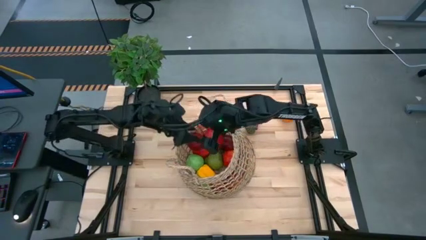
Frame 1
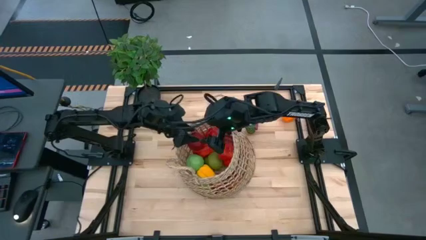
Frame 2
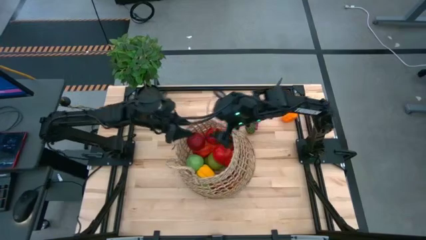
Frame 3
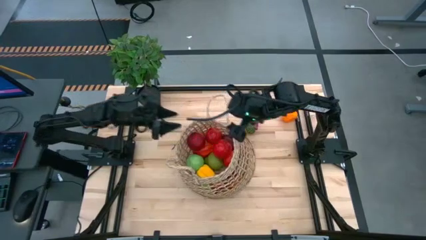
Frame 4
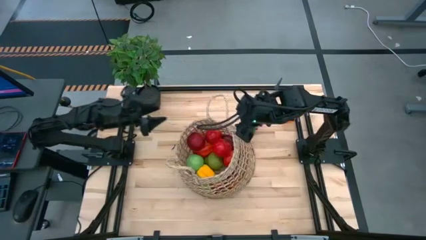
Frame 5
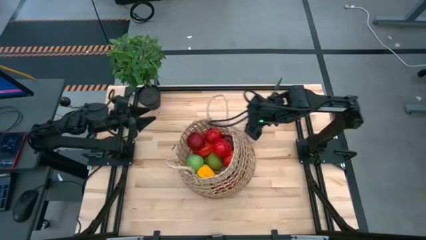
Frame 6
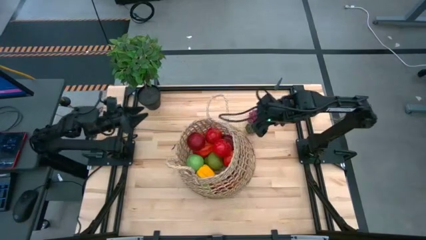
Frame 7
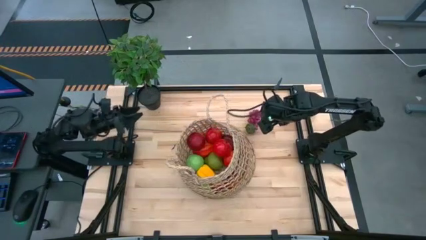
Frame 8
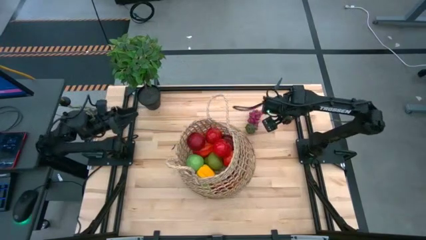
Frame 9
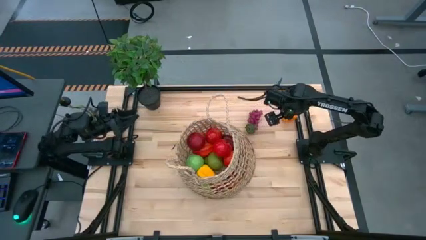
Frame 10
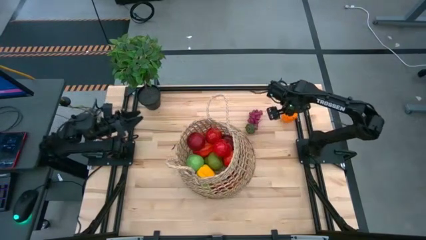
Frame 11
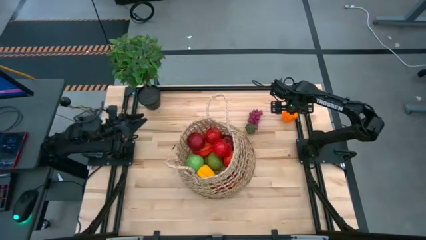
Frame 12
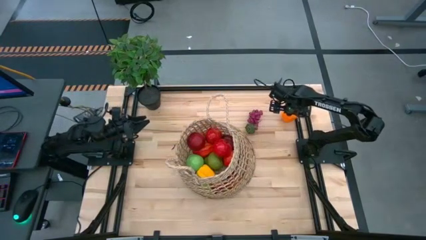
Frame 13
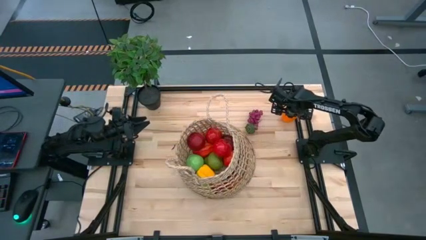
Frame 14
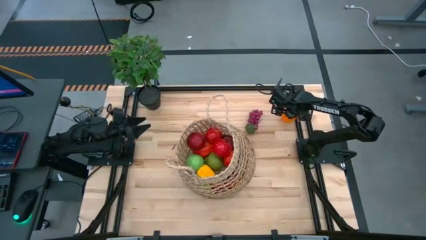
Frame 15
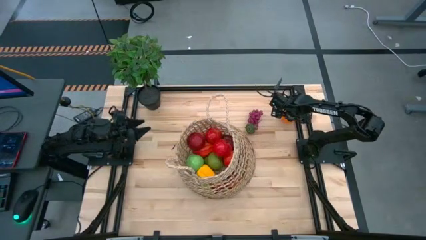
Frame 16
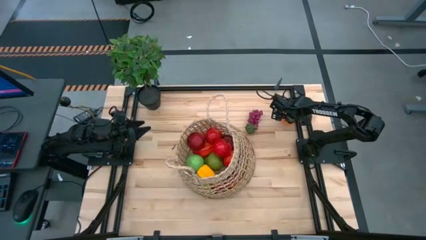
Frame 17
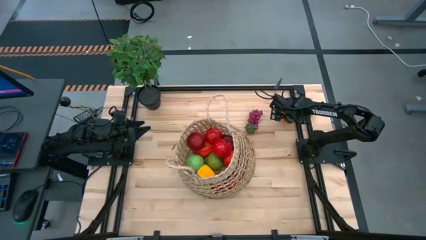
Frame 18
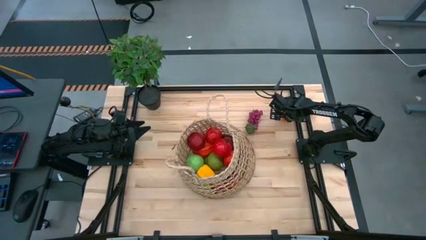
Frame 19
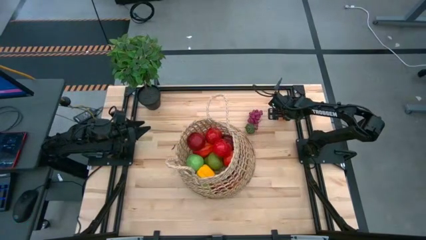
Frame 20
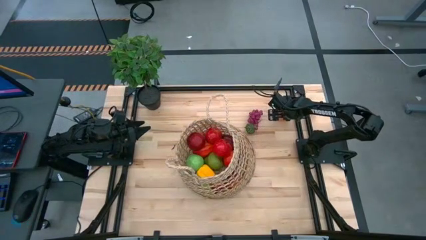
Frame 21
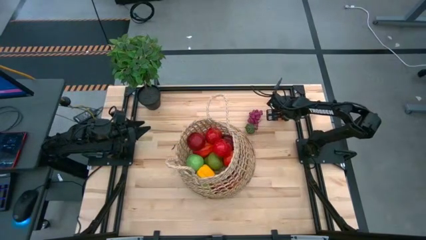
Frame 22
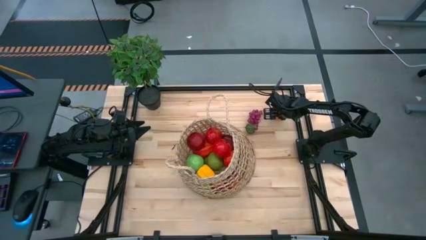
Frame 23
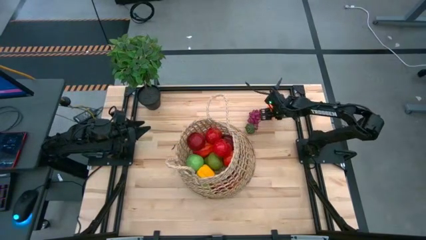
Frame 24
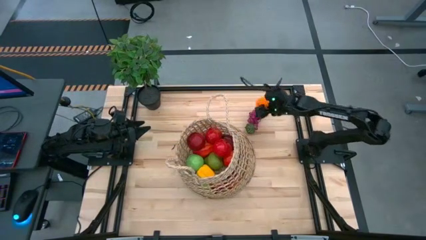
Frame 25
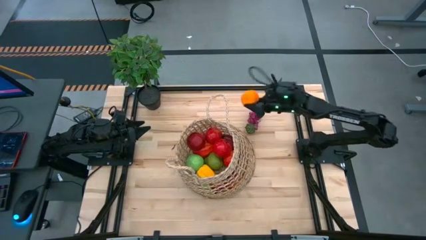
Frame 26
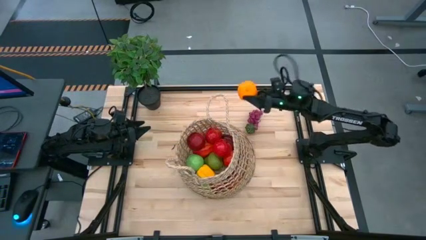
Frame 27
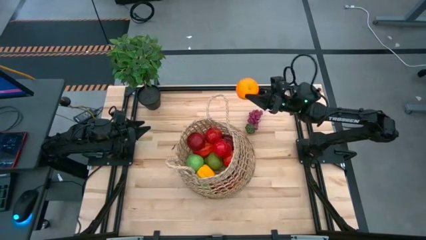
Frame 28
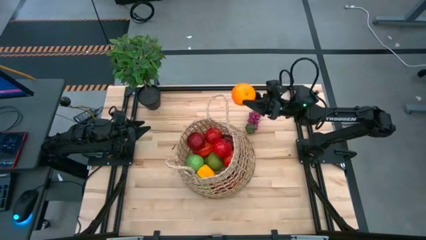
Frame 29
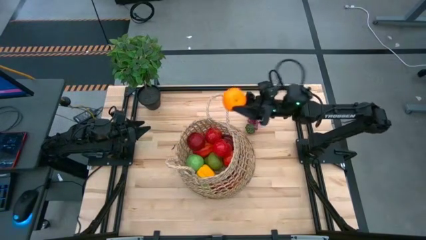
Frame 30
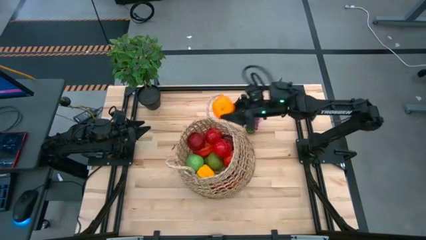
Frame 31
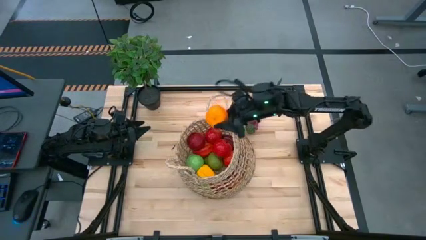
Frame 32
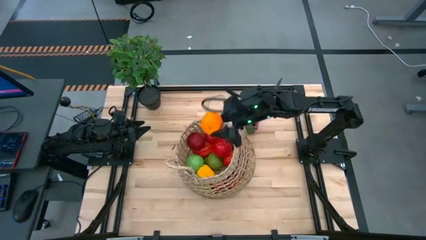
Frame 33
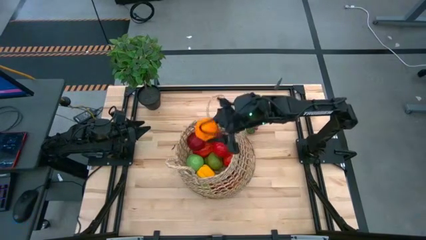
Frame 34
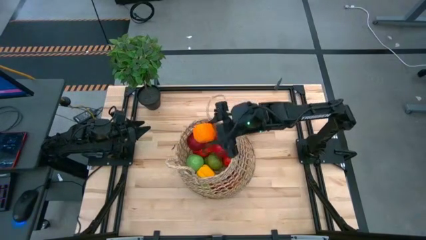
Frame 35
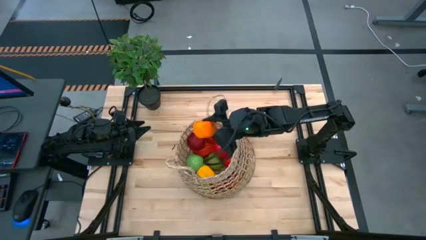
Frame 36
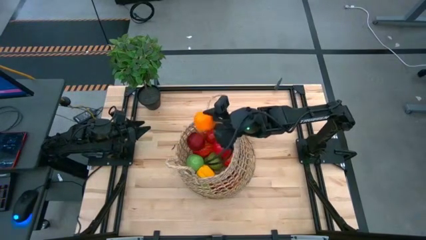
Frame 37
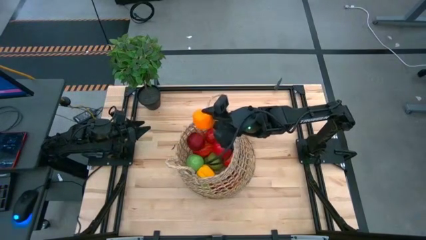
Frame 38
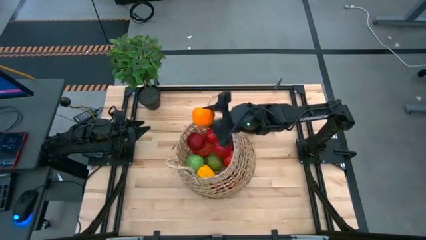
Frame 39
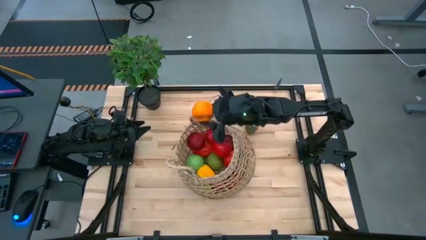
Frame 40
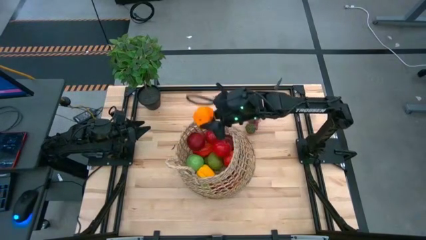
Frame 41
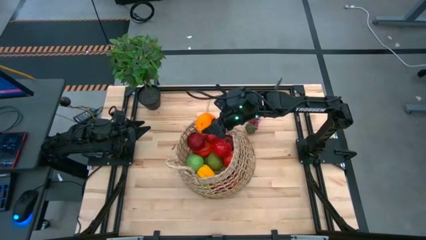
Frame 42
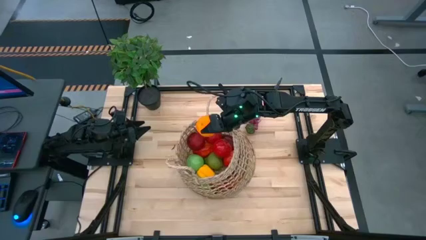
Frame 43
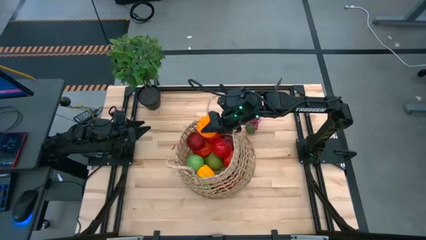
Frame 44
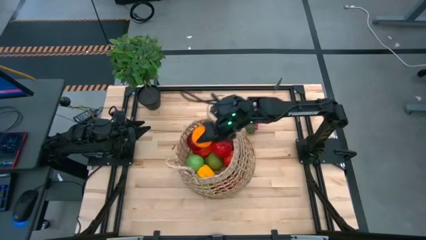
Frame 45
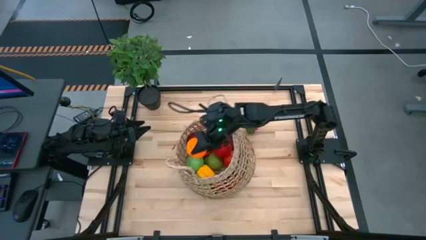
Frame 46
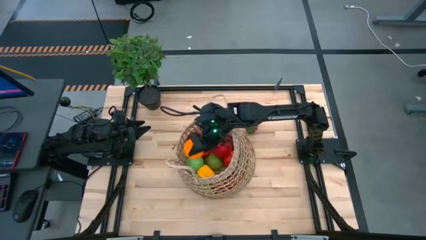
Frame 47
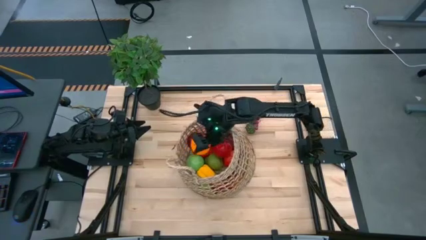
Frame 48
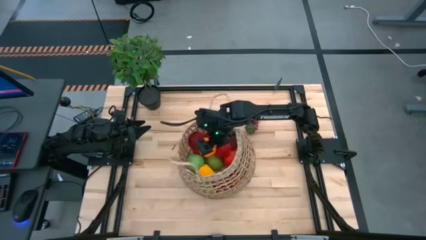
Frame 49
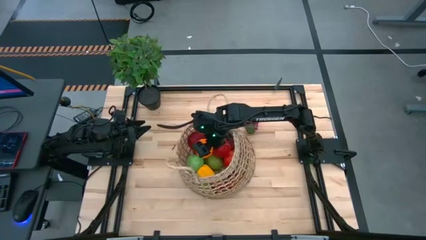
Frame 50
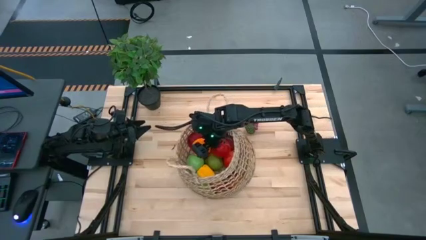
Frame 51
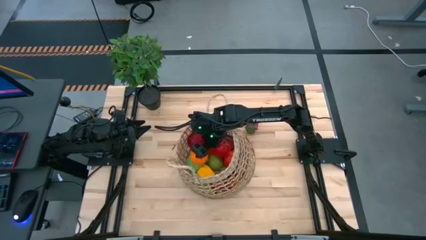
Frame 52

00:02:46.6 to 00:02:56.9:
Task: Build produce basket
Put the orange into the brown basket

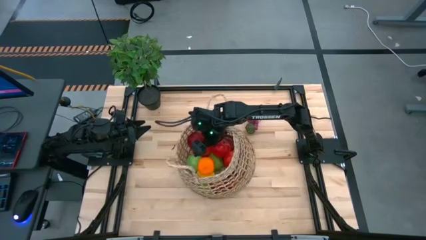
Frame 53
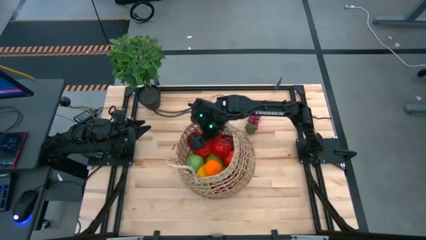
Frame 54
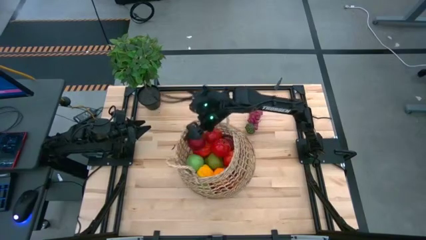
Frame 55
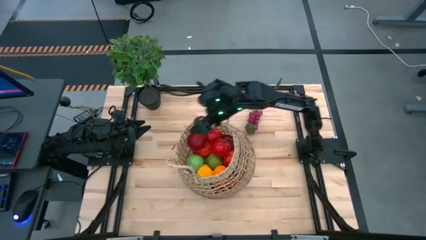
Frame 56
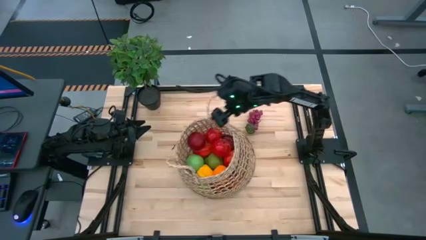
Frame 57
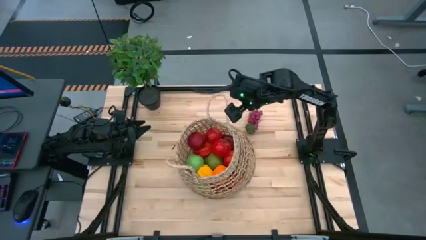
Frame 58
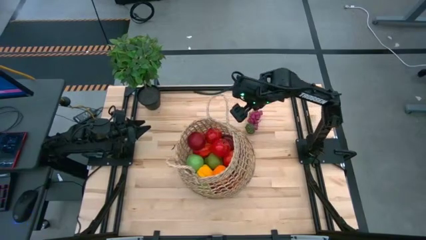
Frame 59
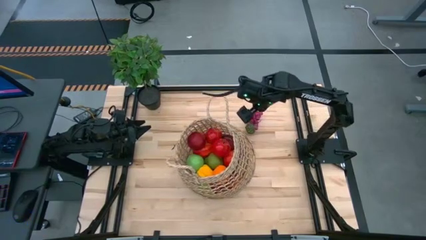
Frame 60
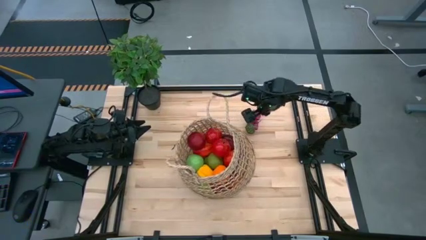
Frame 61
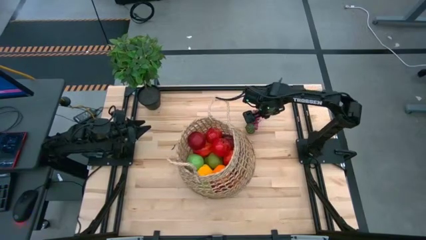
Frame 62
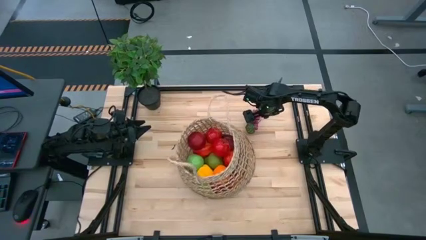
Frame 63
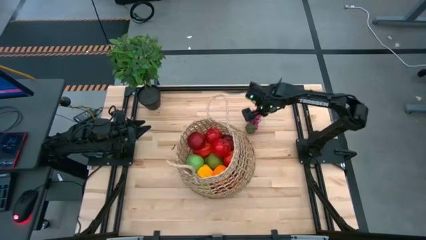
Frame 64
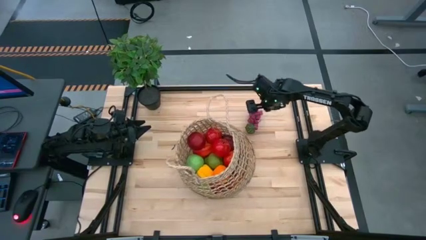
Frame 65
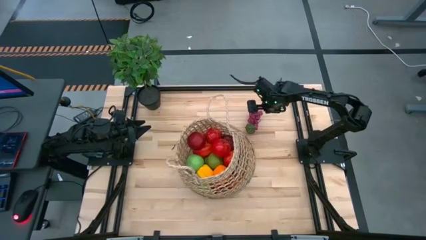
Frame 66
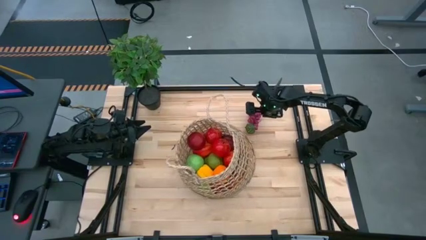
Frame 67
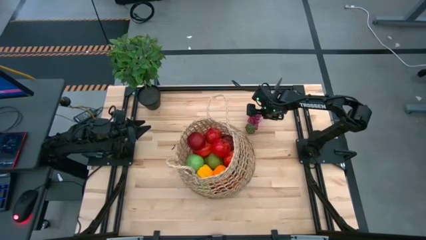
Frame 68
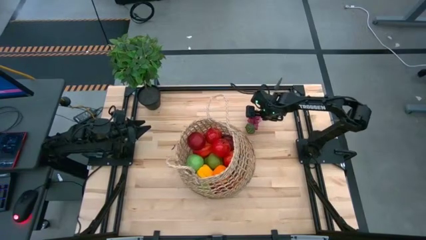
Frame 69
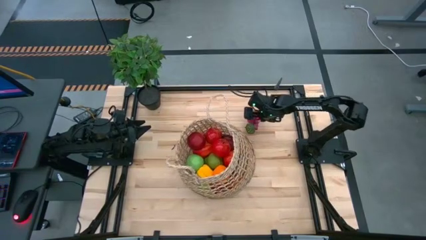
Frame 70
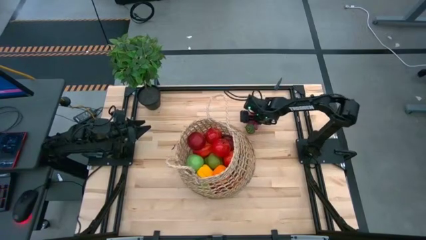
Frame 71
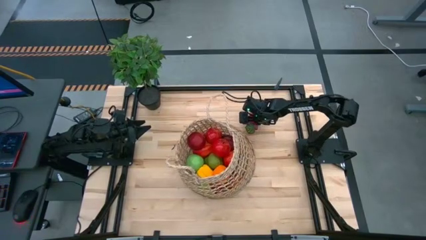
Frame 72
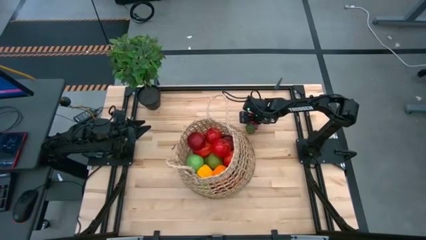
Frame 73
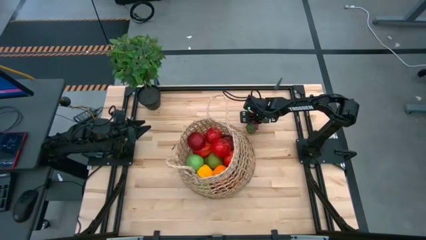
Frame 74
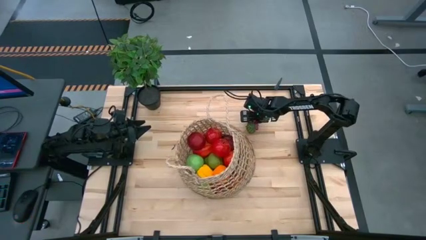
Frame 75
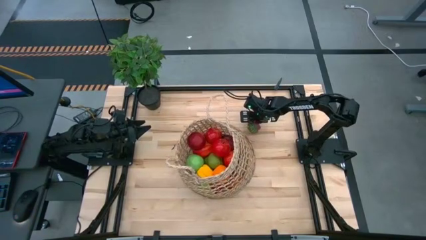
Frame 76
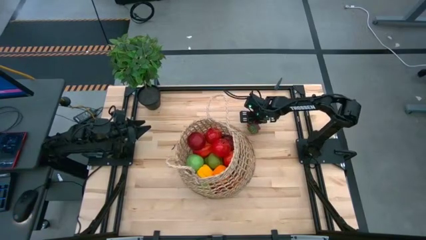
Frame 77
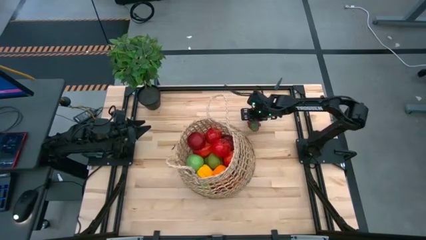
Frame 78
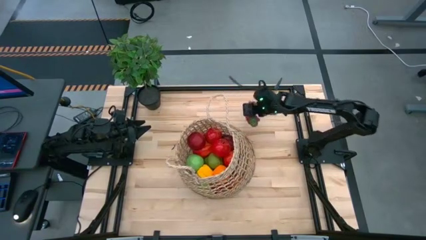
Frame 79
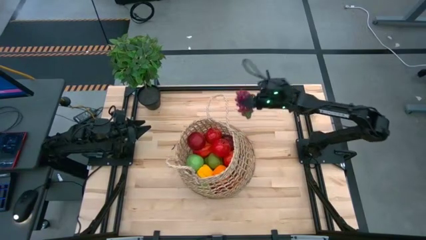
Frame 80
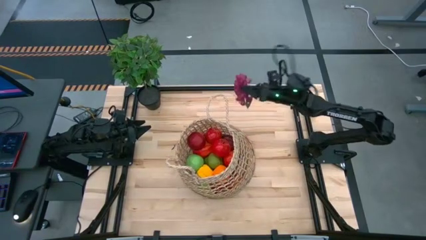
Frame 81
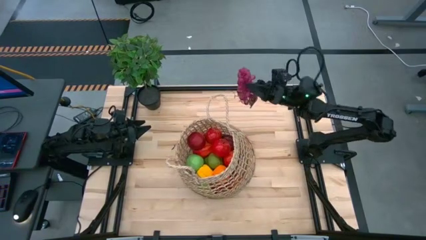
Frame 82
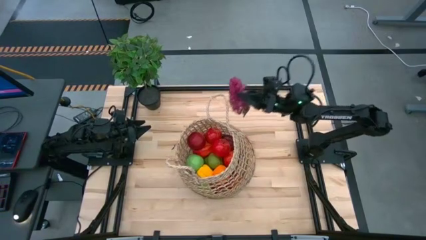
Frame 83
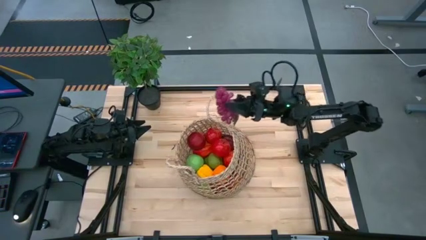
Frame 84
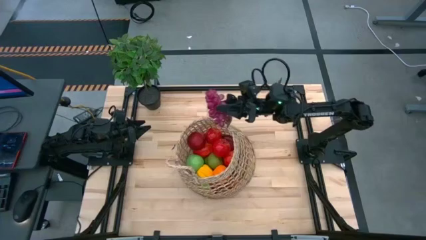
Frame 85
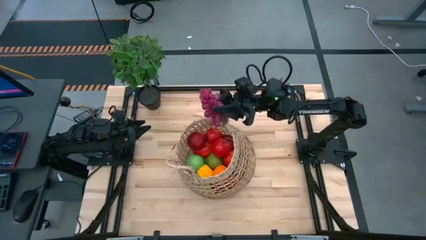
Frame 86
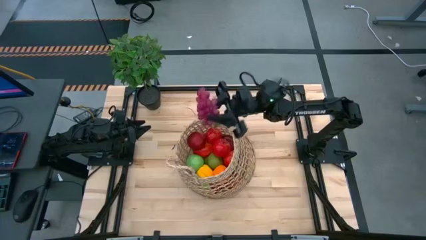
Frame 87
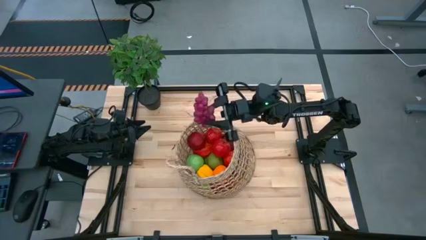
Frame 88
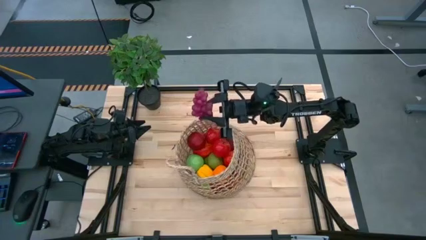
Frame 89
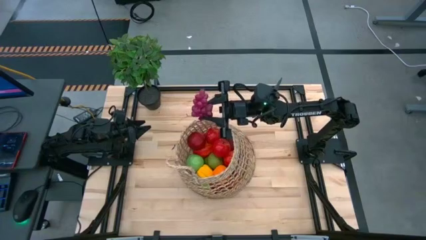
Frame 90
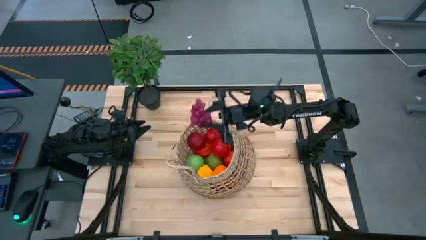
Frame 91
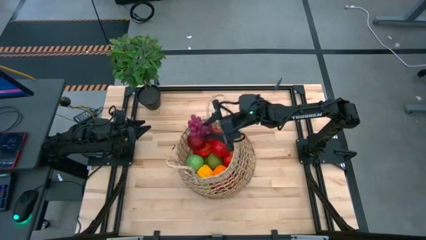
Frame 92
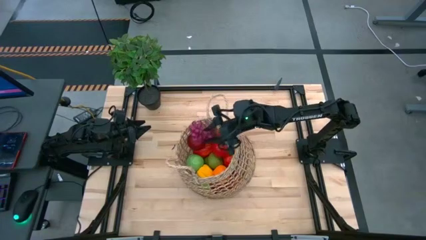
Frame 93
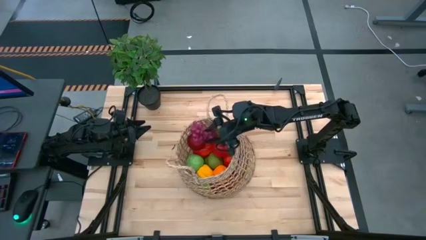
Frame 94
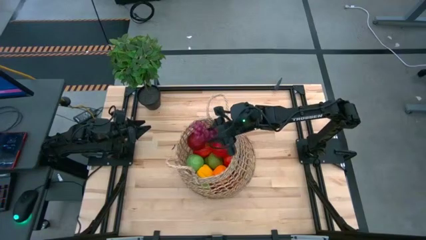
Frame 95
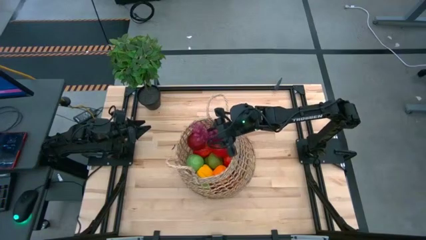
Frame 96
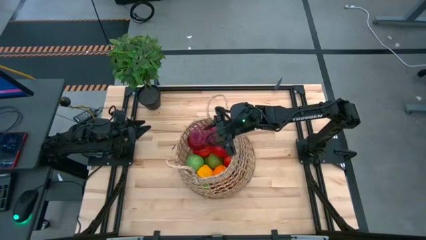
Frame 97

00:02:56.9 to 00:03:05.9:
Put the pink grapes into the brown basket
